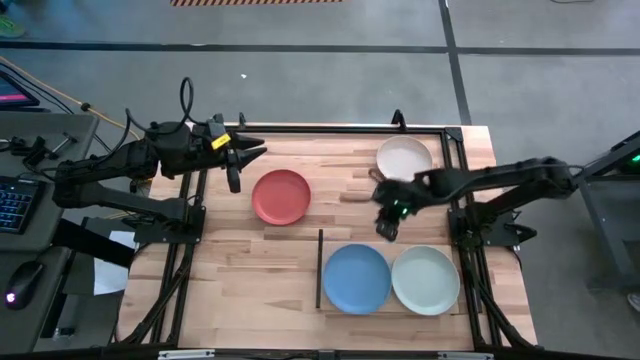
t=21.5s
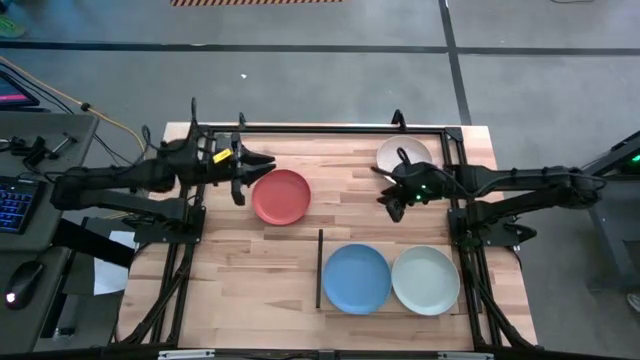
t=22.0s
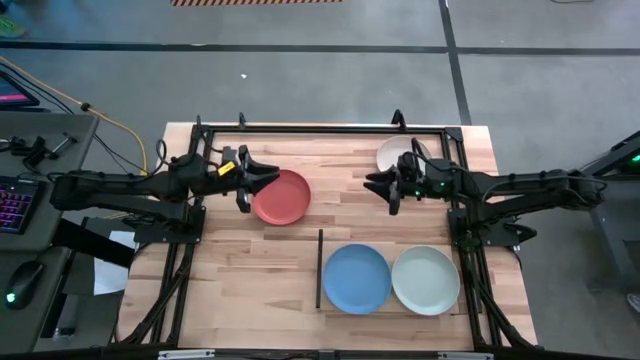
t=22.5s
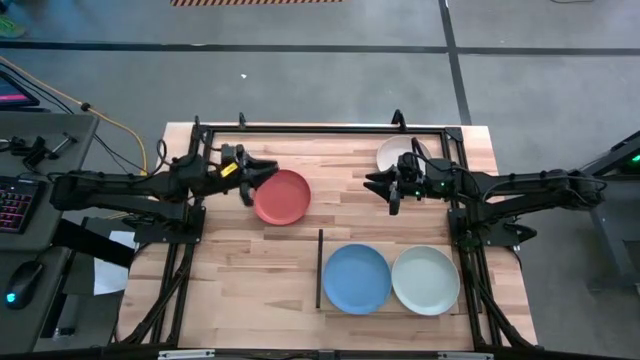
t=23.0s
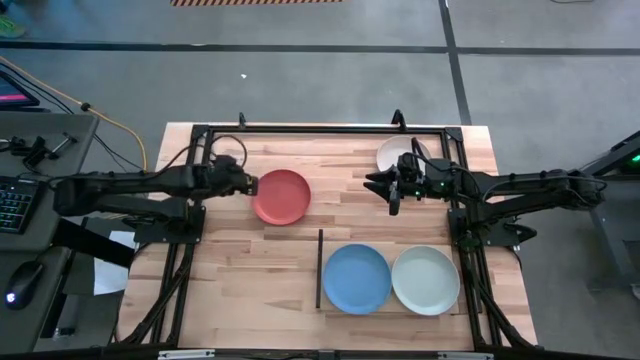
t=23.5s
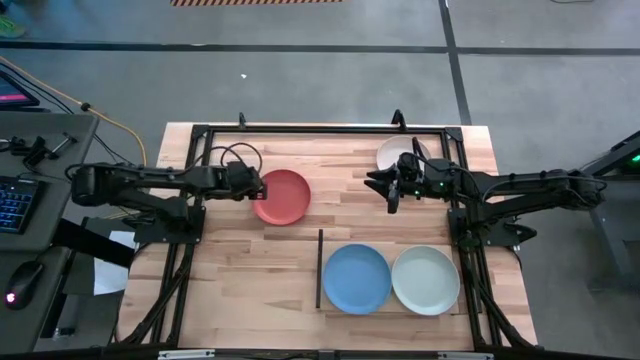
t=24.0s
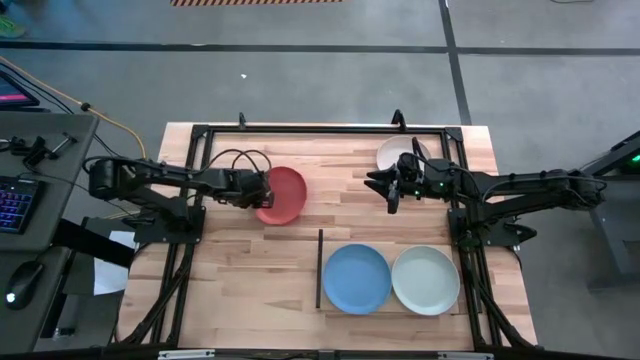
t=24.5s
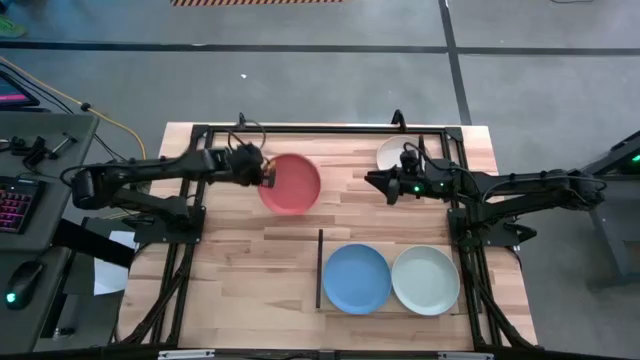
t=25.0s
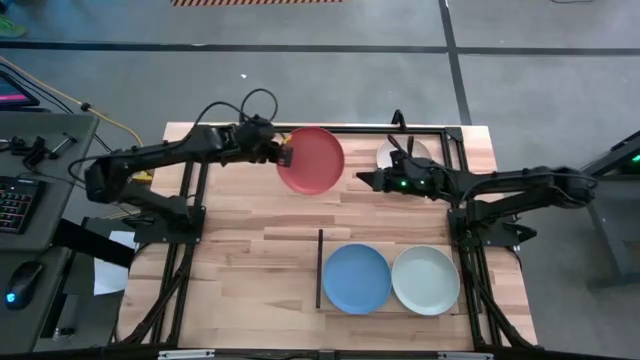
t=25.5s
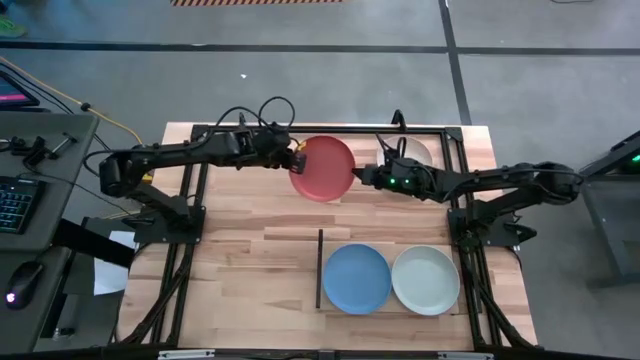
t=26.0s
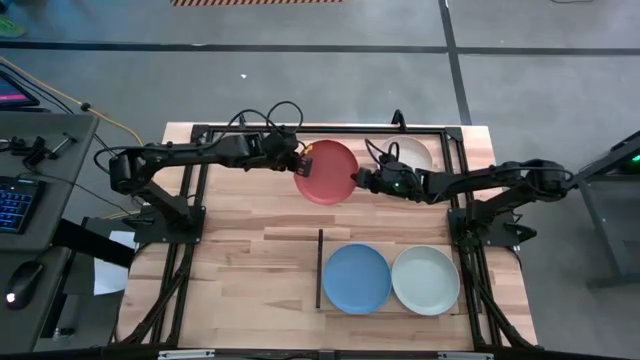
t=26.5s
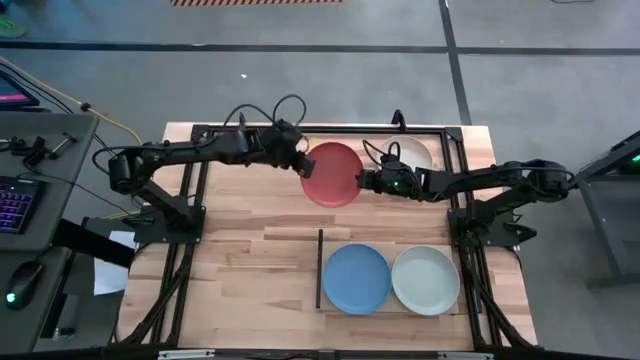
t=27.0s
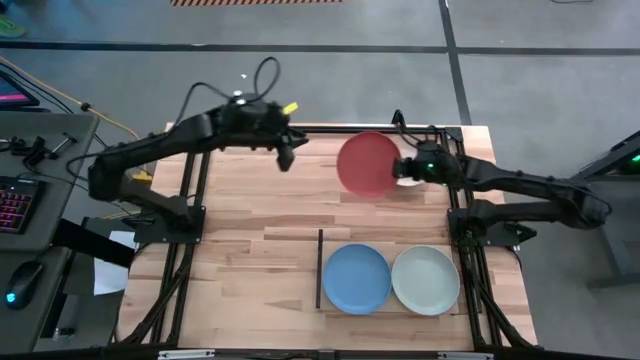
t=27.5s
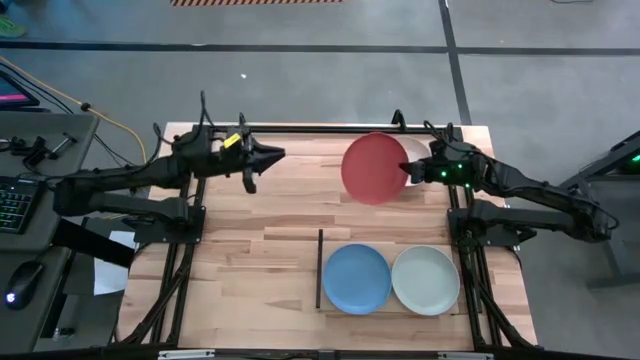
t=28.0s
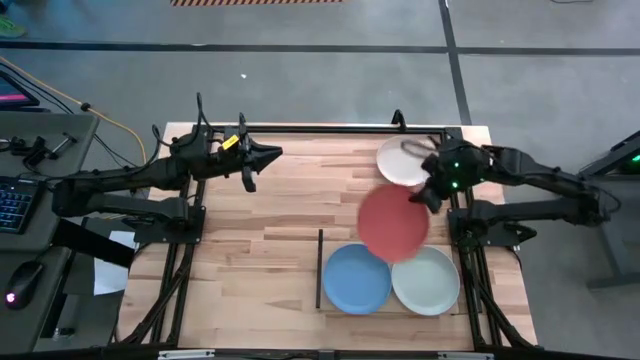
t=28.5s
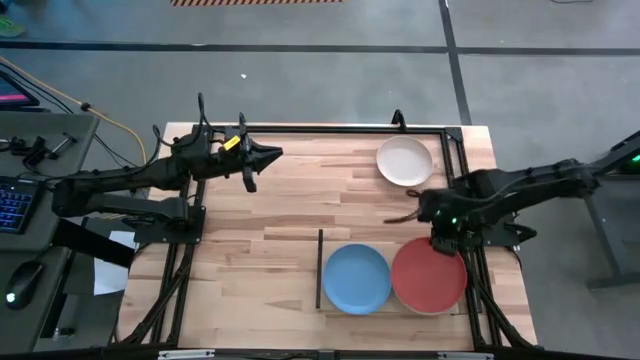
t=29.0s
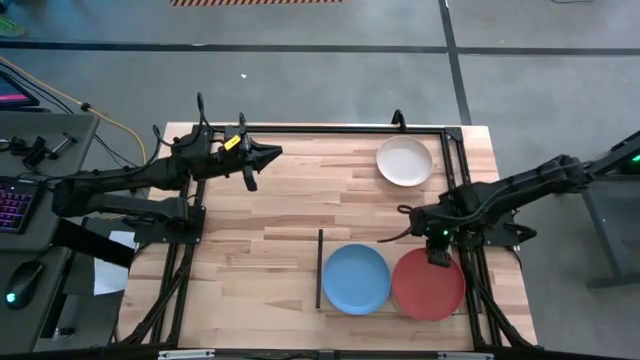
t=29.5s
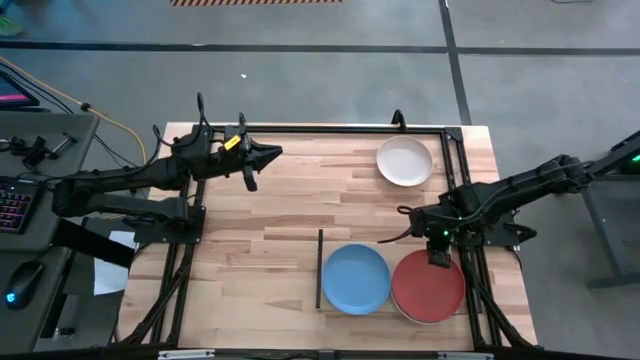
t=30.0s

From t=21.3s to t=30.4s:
Task: Place and stack plates onto a shelf
Stack the orange plate on top of the white plate

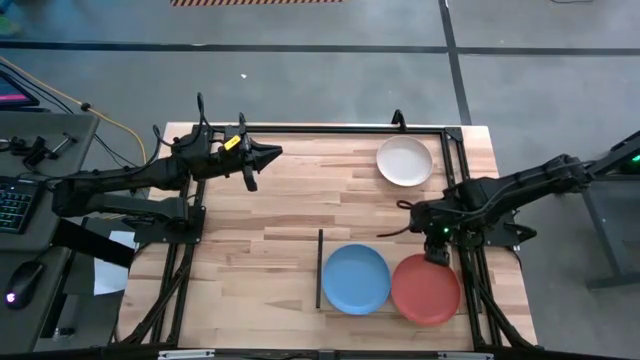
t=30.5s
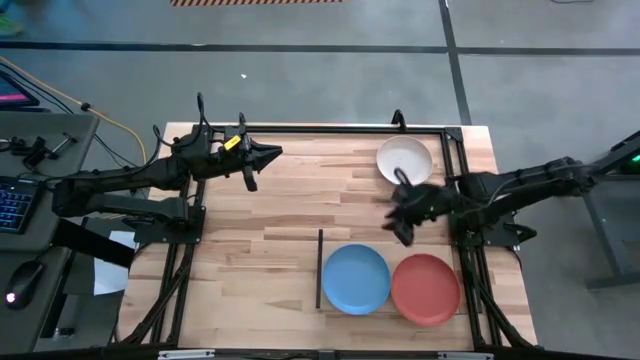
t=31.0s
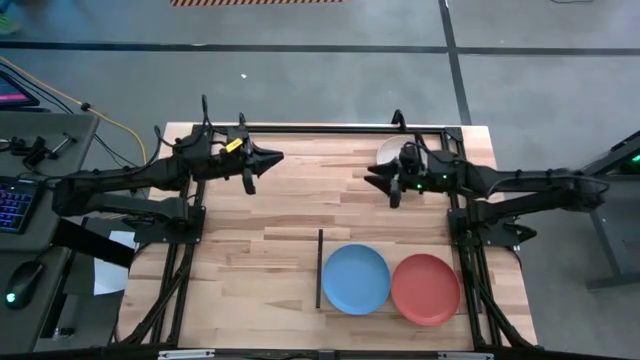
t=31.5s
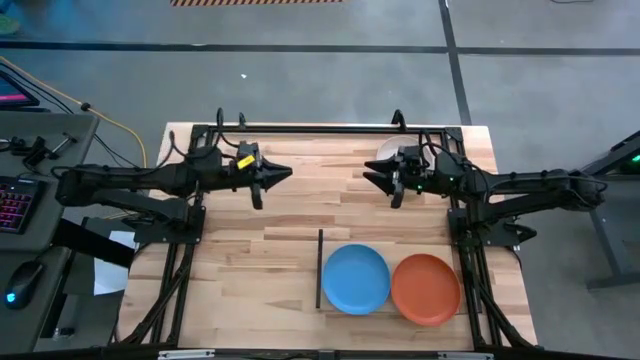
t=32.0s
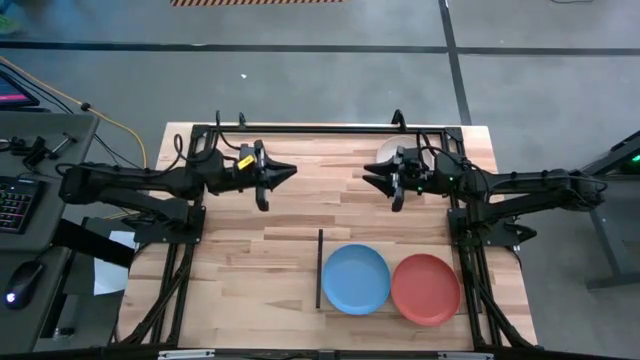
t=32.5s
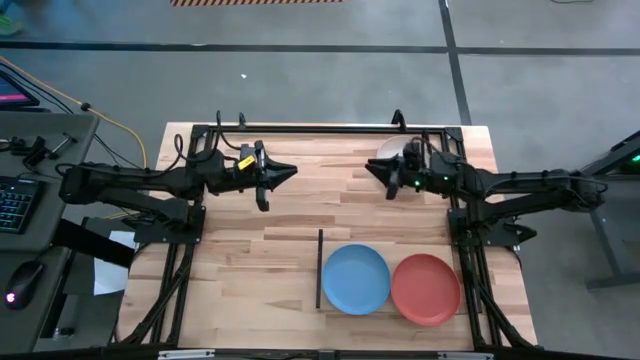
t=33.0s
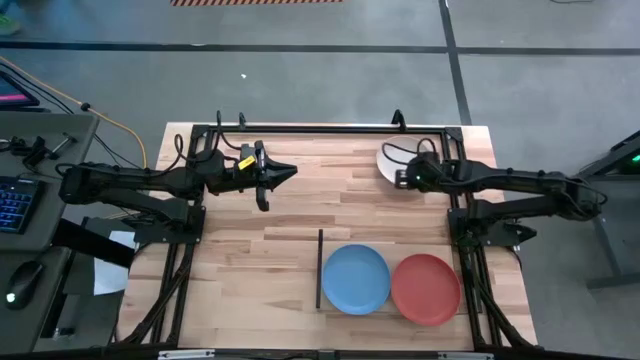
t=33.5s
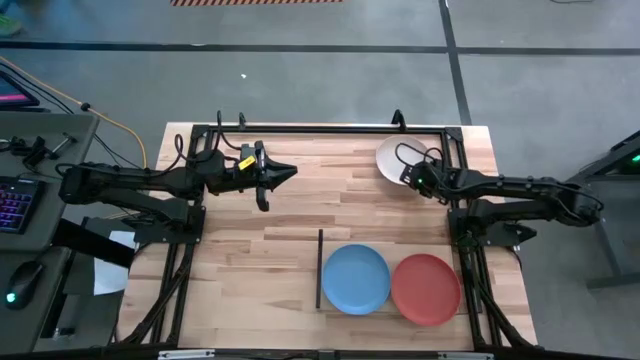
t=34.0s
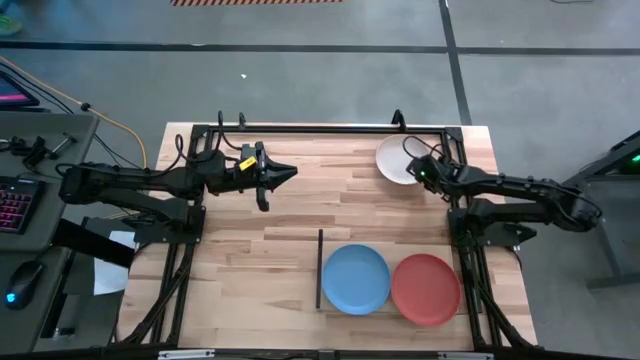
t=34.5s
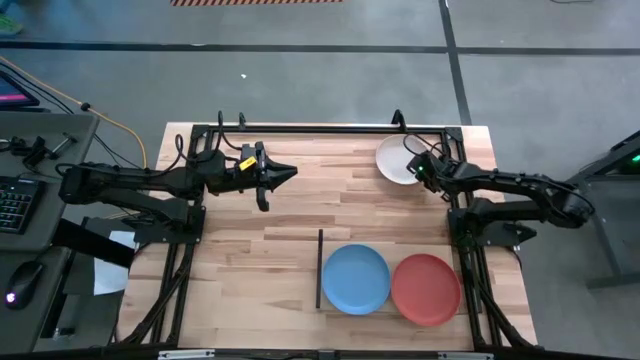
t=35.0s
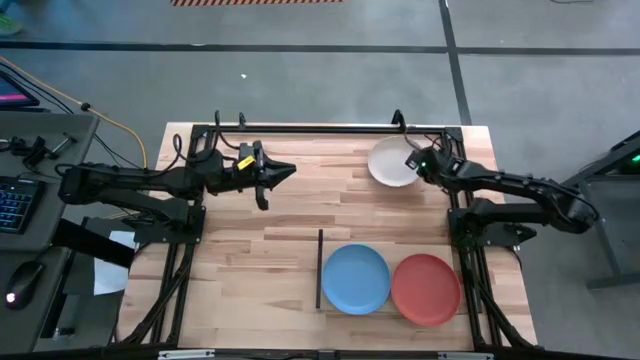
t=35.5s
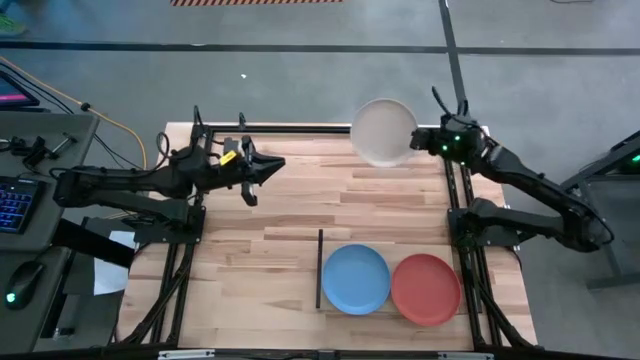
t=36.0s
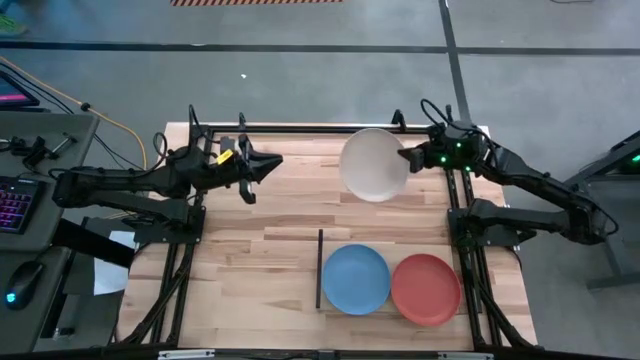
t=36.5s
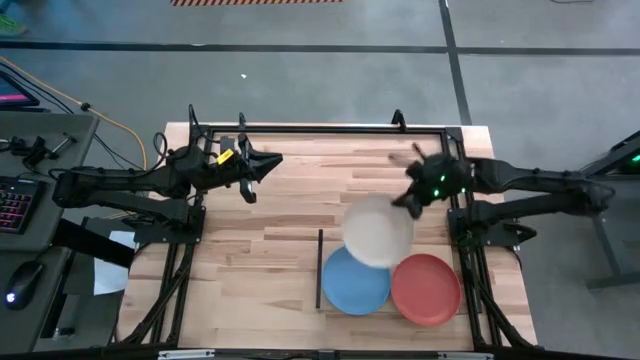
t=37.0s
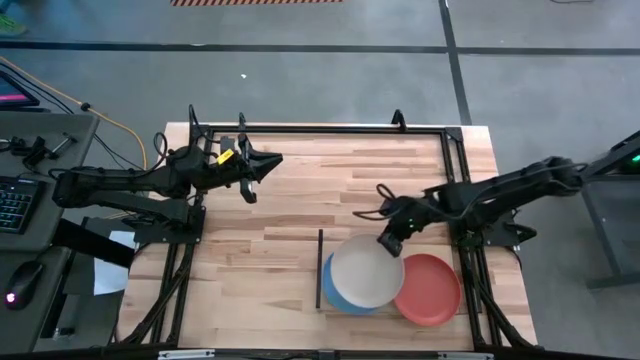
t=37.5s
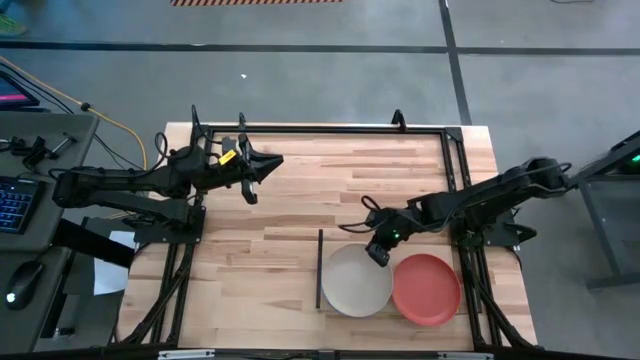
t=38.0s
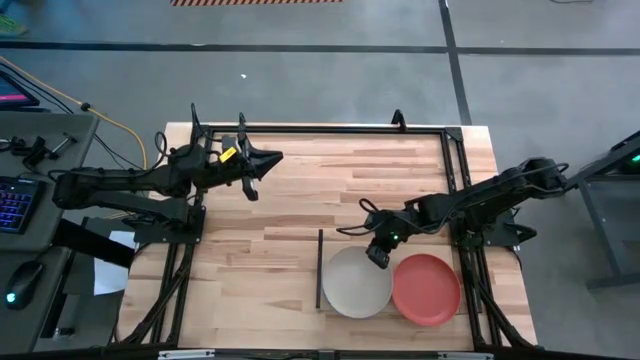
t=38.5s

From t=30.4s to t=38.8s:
Stack the white plate on top of the blue plate

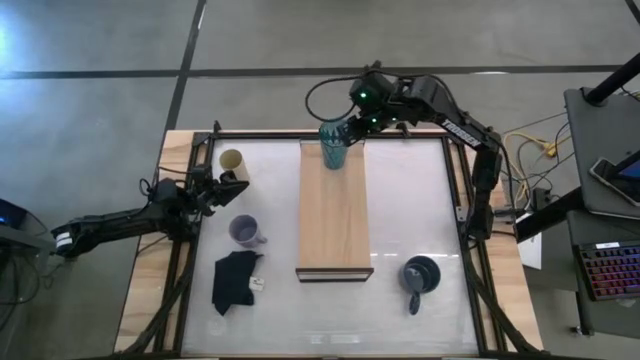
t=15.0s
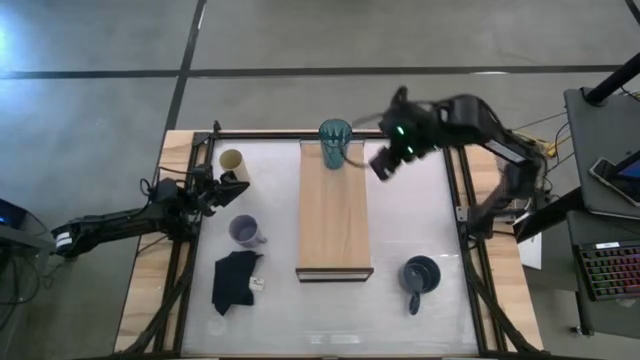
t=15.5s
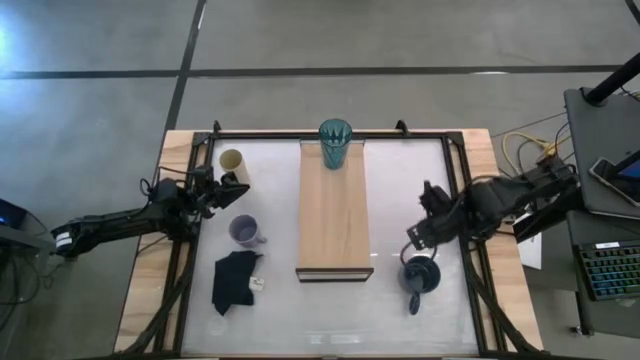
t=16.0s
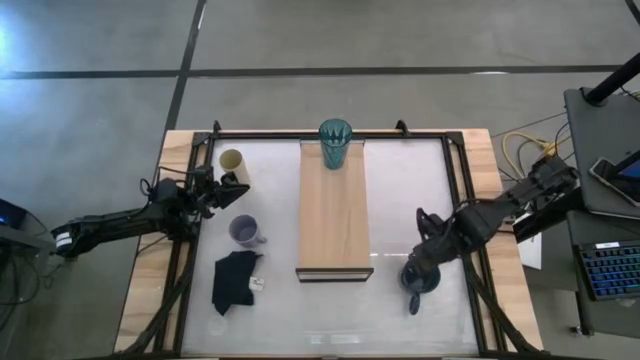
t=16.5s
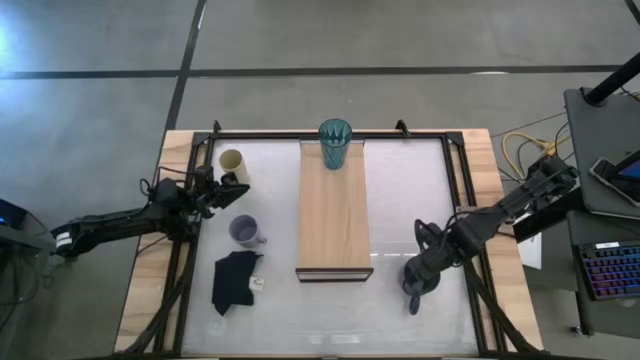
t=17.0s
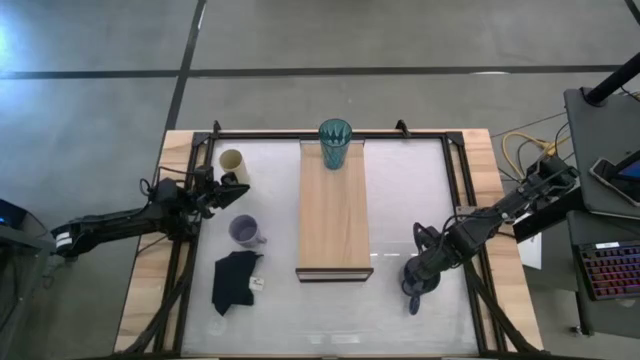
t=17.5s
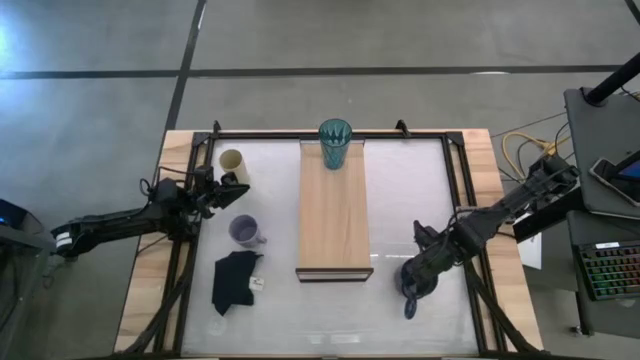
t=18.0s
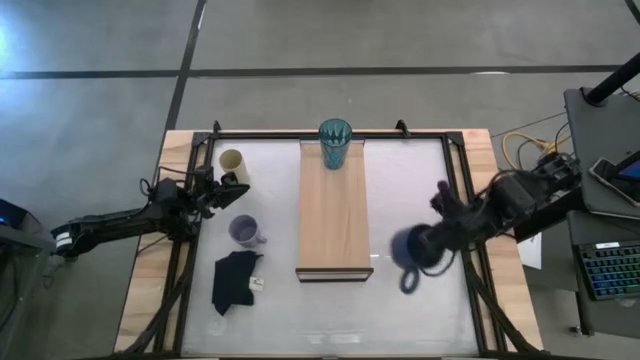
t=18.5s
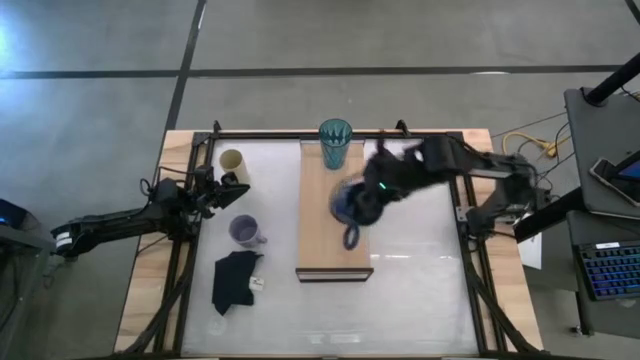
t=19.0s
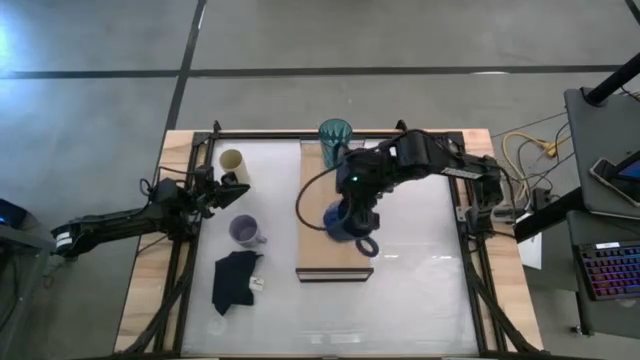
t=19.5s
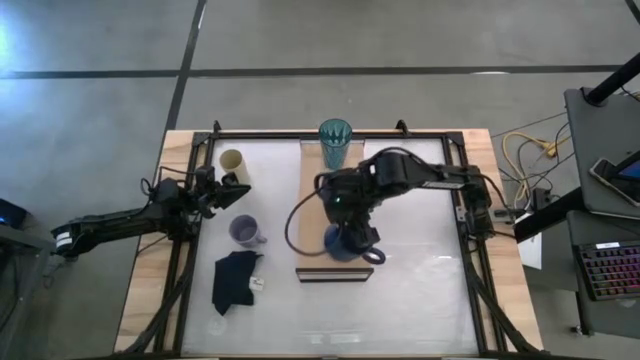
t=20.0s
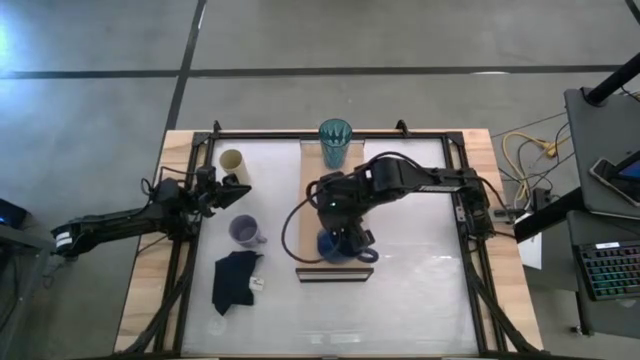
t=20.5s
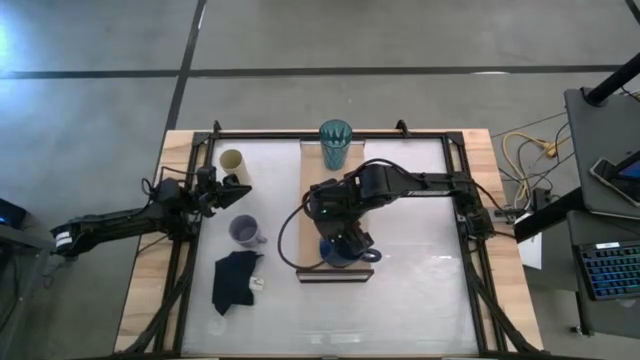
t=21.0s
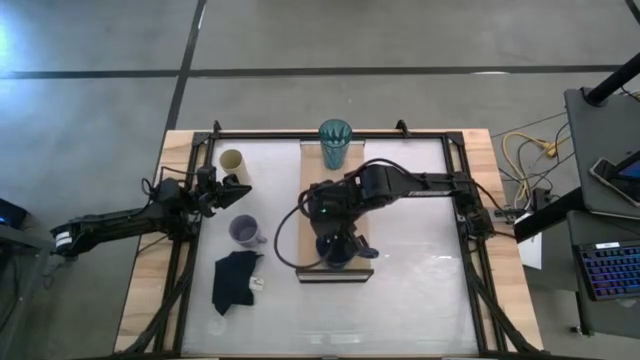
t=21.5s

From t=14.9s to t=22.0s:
Task: Stack small to large cups/mugs on shelf
Put the blue mug on the shelf
